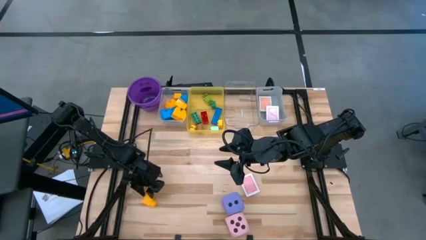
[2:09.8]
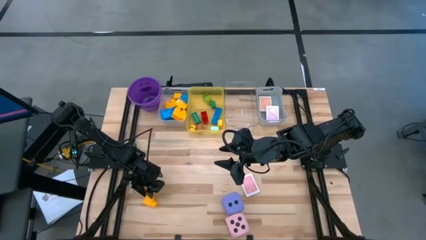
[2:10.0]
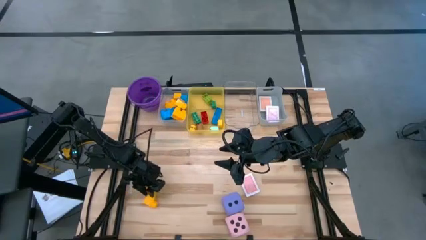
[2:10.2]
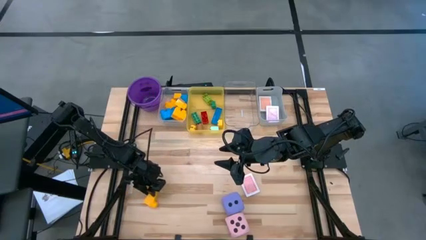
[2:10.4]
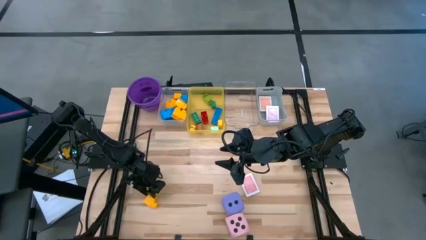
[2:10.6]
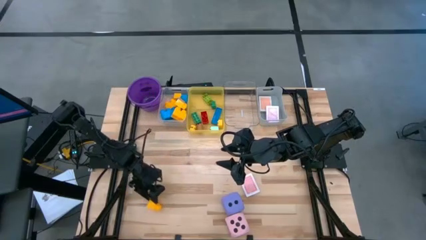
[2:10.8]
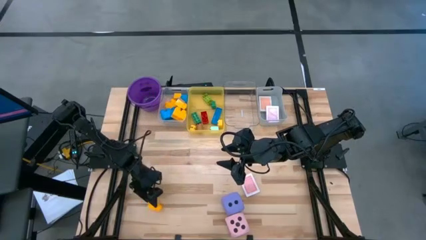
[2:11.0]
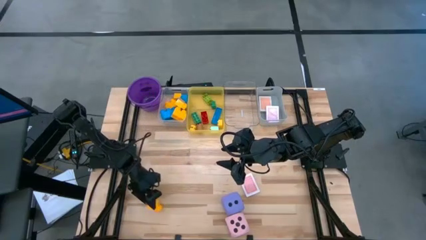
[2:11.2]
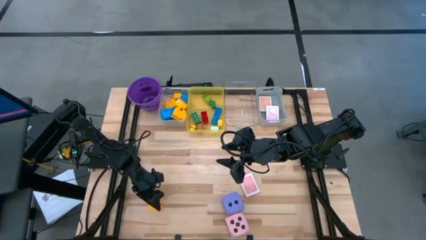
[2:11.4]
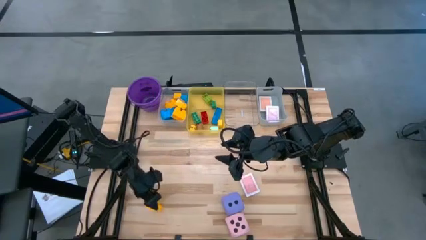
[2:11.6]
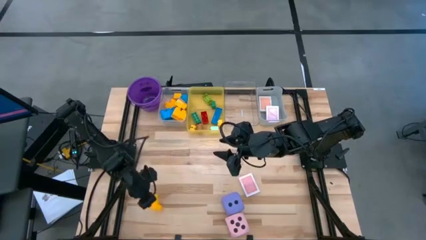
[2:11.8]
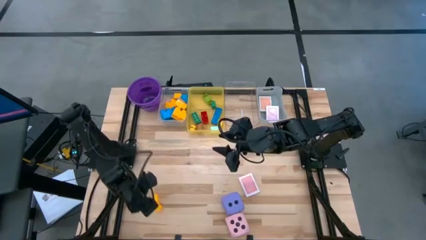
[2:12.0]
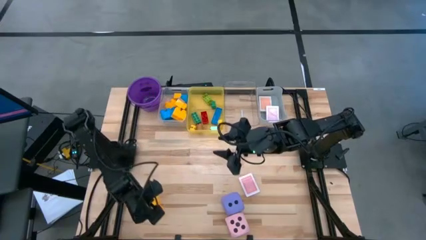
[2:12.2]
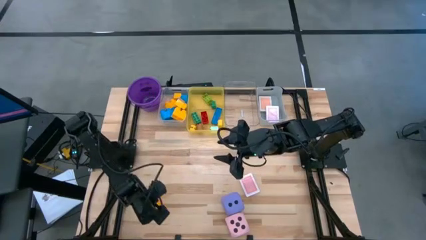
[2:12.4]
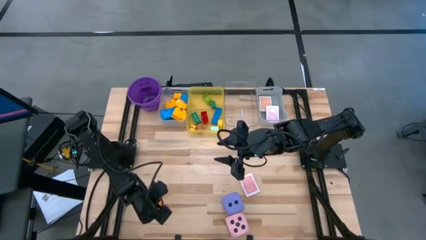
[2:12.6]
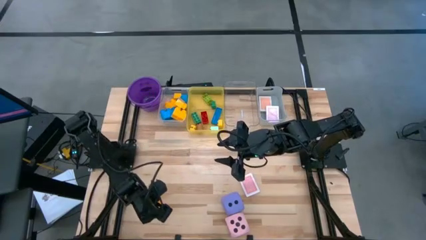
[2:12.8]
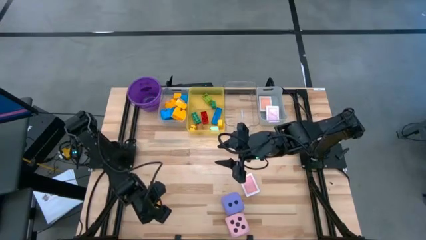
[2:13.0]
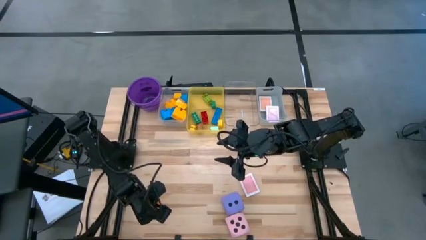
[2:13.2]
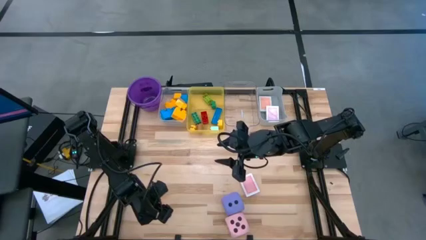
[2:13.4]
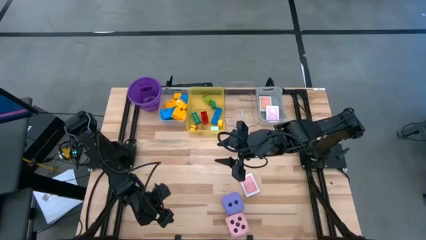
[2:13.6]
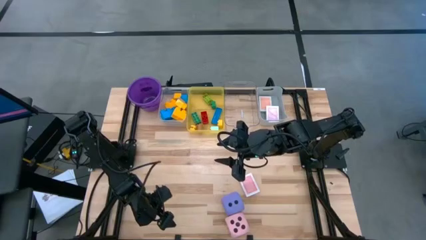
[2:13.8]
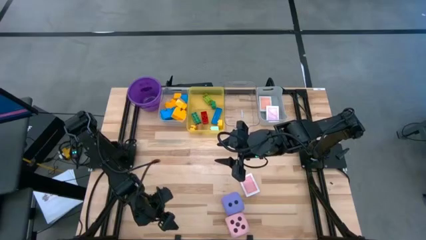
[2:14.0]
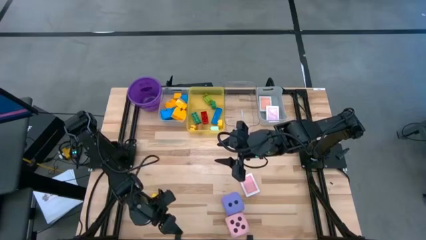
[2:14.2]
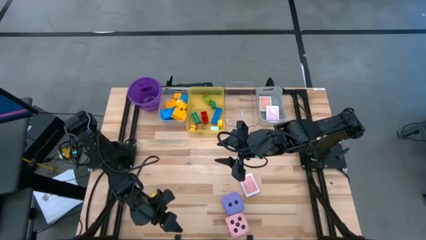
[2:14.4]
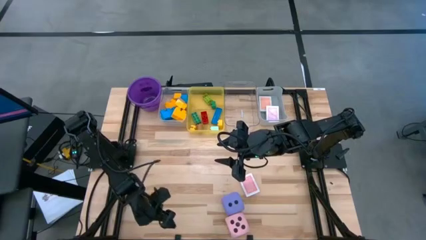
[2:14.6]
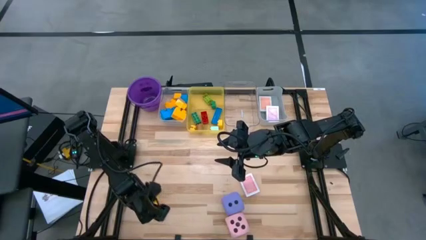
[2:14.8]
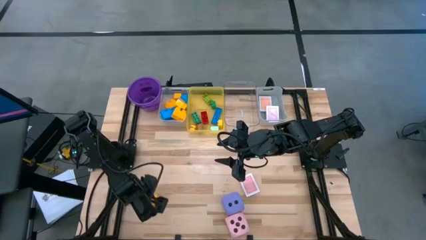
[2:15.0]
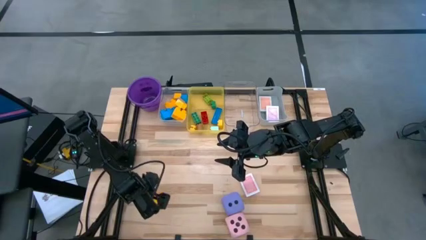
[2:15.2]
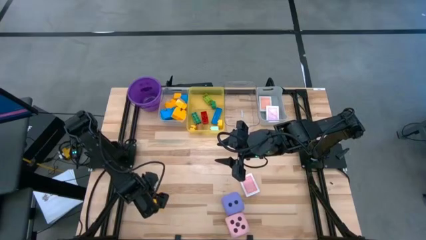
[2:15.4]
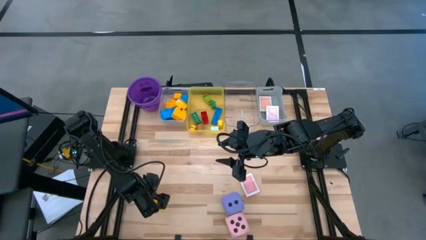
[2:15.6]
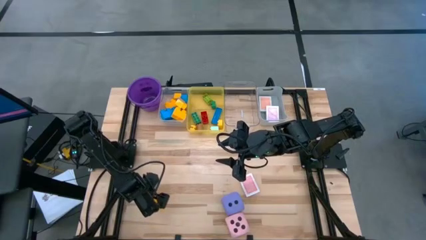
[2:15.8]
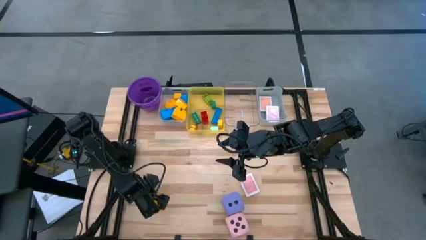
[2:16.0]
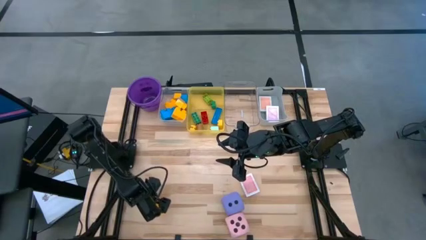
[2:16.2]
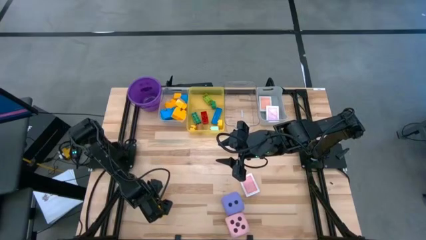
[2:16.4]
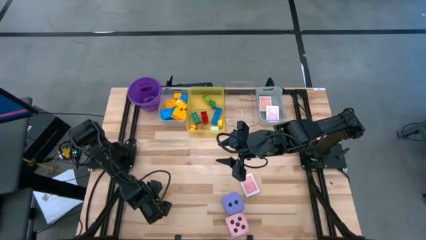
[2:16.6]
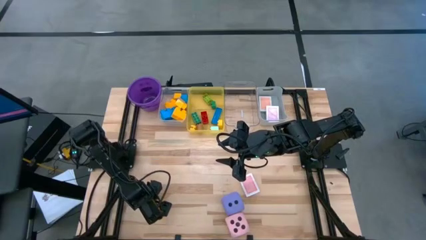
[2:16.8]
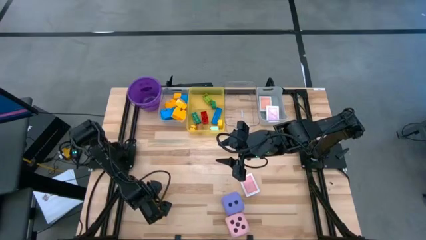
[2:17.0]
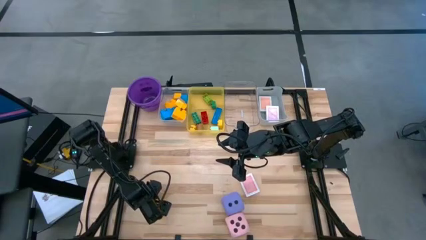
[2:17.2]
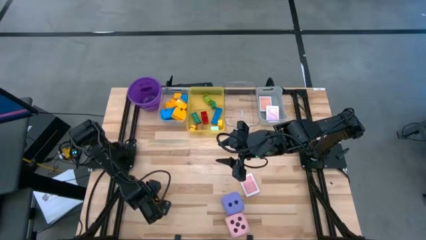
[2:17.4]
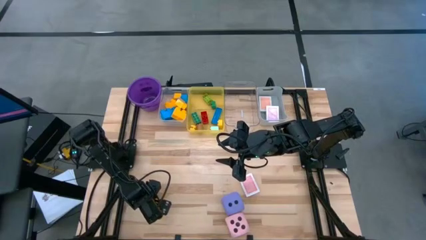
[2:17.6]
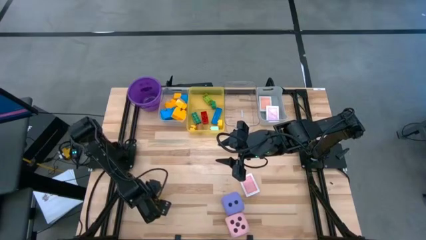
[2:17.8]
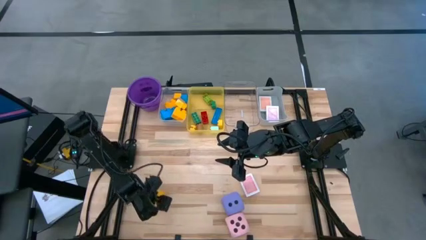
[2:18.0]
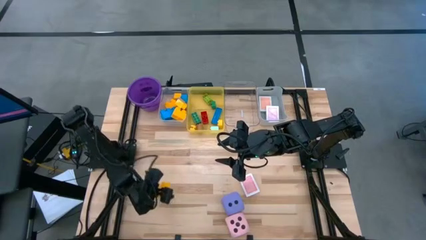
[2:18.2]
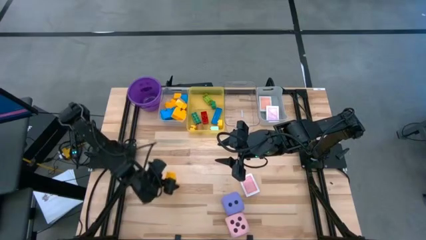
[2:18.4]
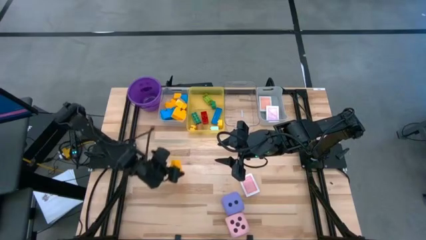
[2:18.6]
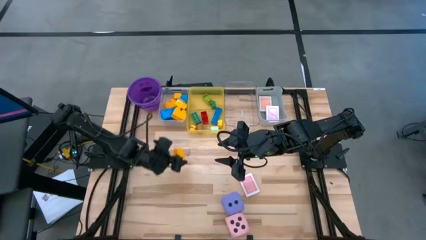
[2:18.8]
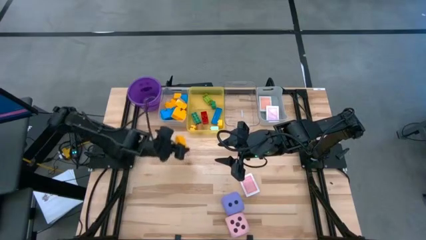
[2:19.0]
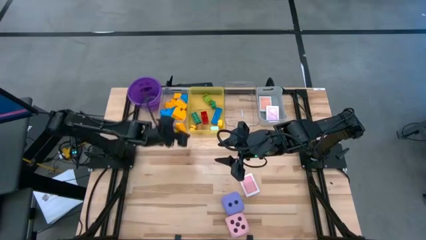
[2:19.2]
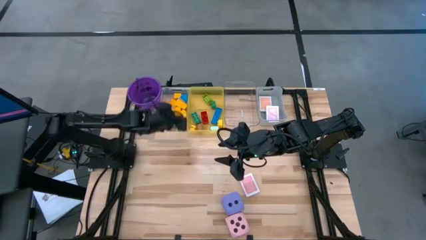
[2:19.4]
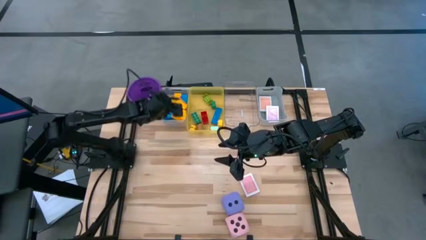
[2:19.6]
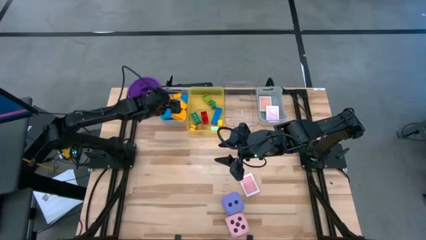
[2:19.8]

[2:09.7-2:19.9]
Task: Pick & Place Toys
Put the big yellow game piece into the white bin

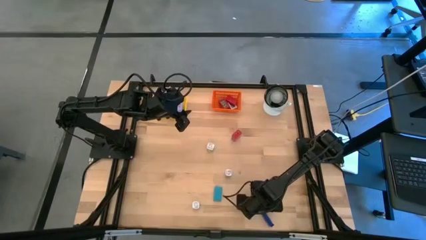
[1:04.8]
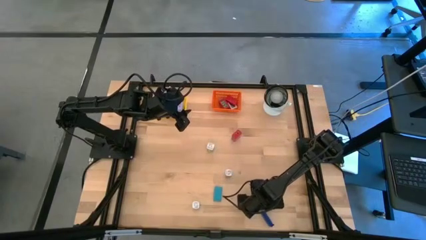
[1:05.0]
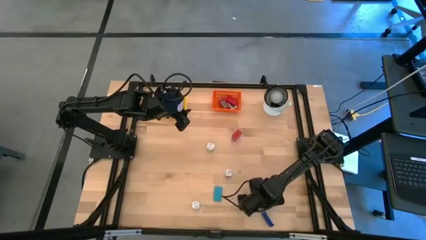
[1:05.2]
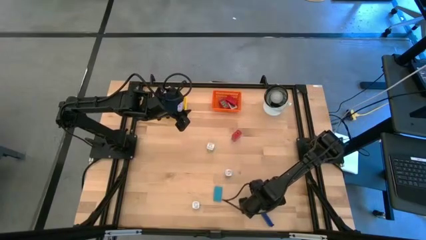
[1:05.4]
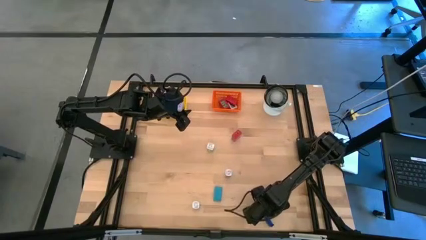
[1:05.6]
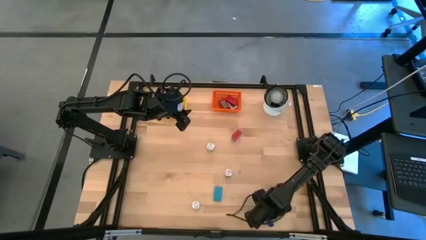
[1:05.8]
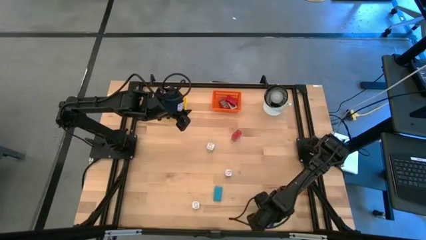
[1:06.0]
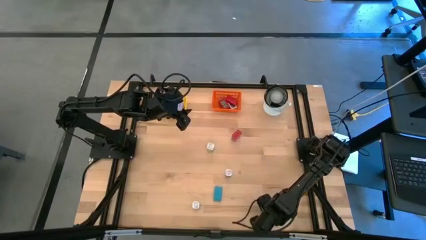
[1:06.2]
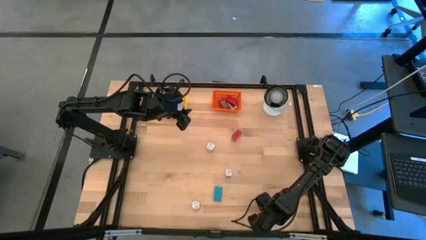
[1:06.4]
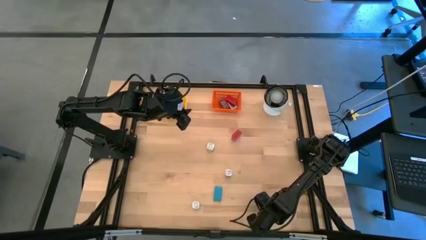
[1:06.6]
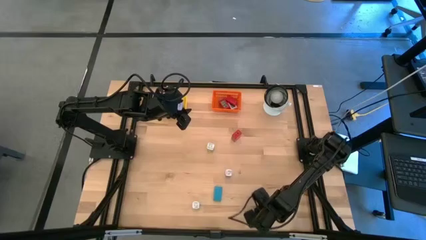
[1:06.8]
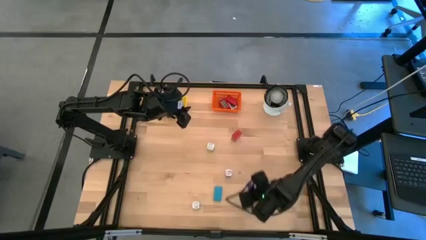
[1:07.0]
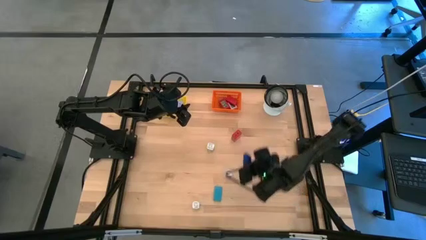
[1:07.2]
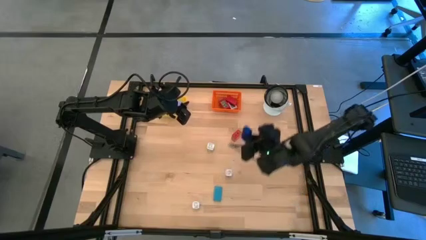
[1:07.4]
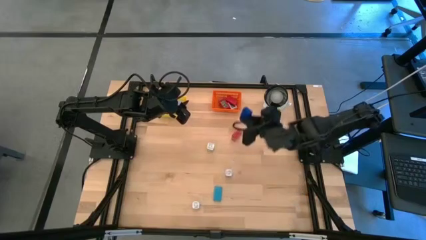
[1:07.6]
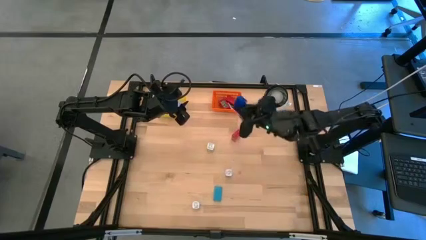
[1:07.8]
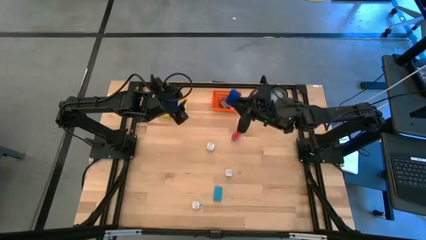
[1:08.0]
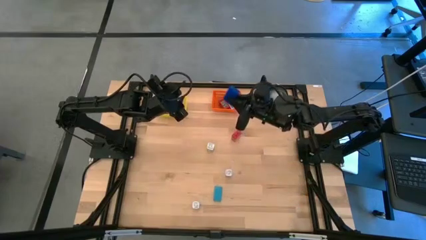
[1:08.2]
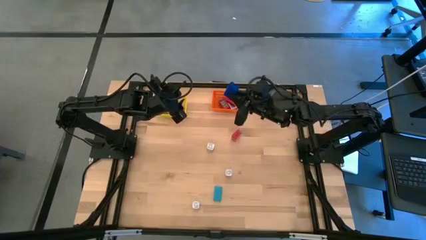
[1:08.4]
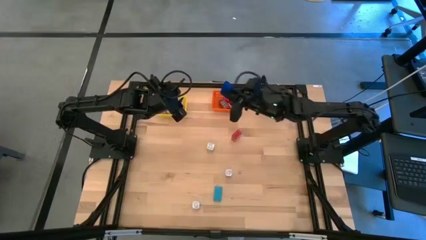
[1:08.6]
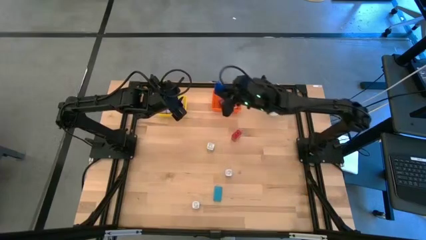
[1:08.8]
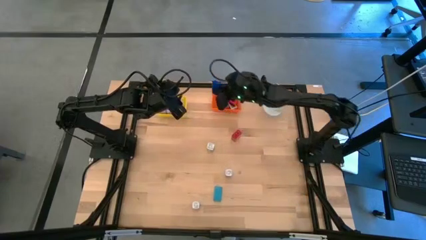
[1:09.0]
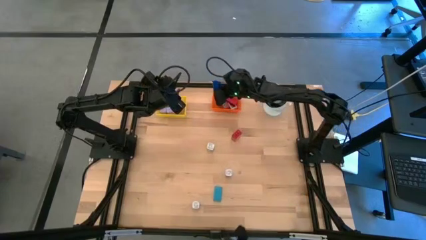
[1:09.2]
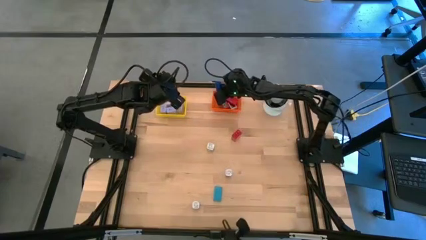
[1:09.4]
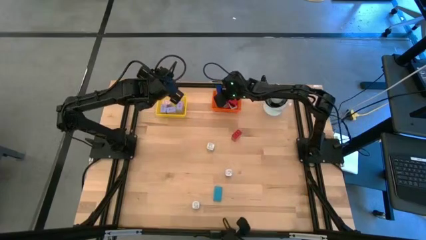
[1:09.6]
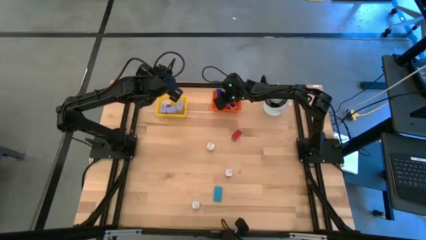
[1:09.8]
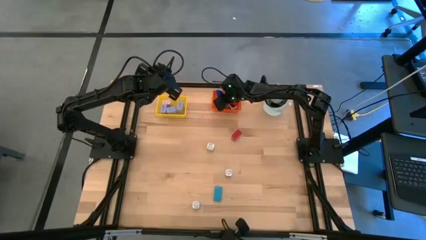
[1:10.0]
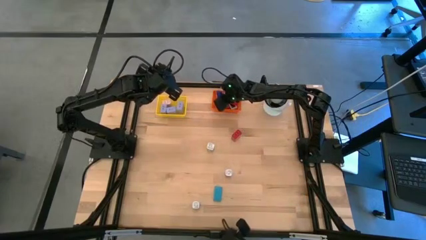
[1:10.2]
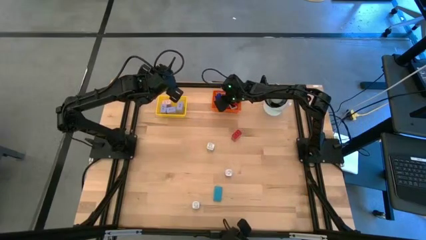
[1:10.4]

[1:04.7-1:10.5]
Task: Pick & Place Office items
Put the dark blue digital timer into the orange bin

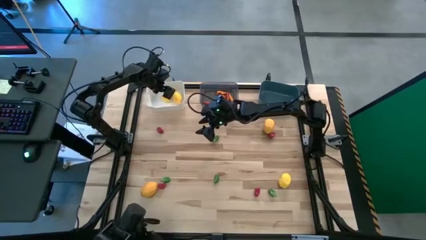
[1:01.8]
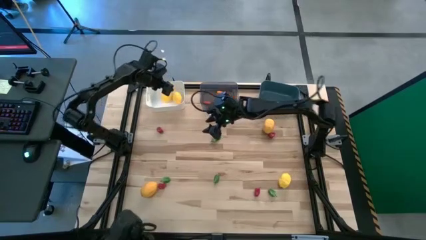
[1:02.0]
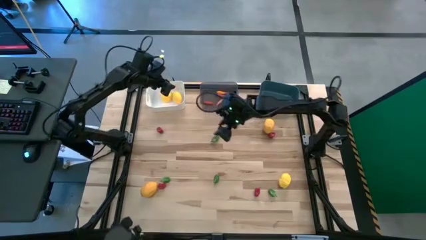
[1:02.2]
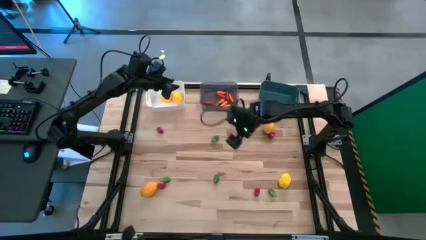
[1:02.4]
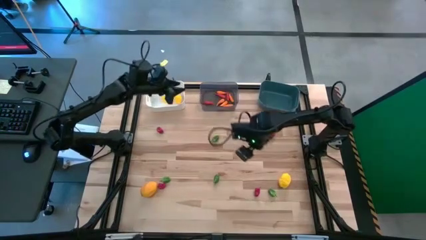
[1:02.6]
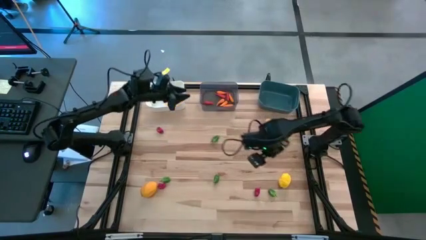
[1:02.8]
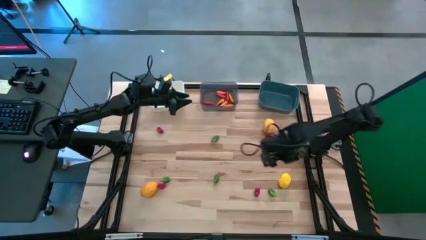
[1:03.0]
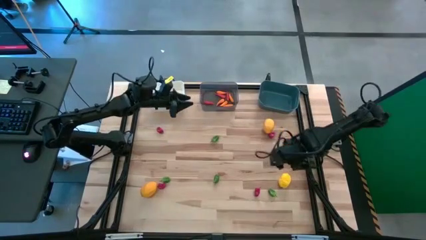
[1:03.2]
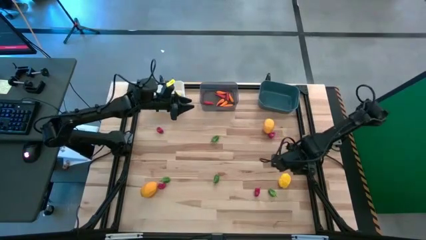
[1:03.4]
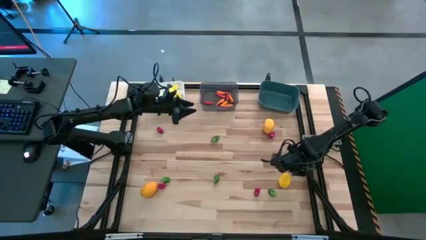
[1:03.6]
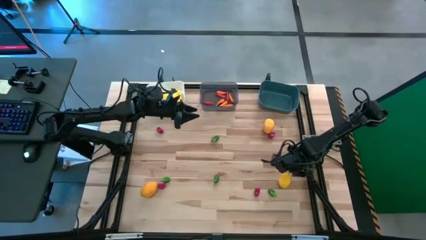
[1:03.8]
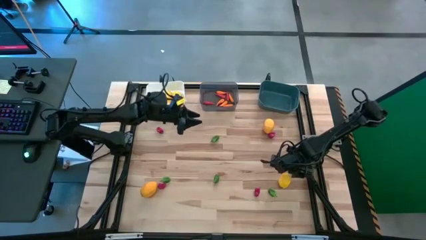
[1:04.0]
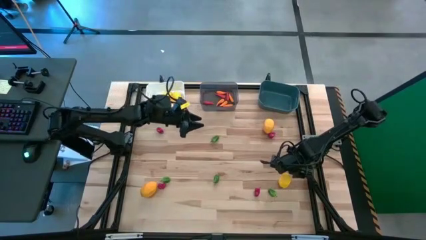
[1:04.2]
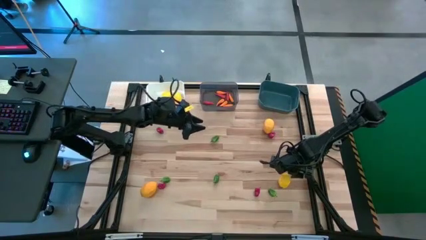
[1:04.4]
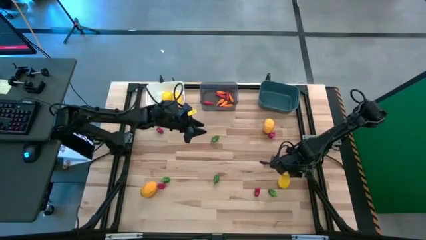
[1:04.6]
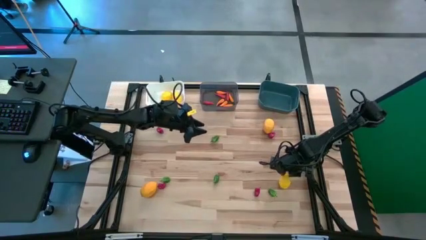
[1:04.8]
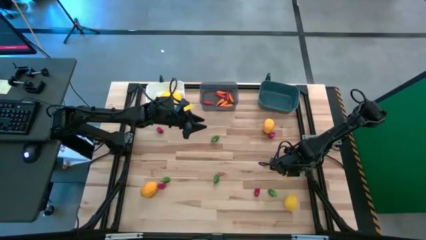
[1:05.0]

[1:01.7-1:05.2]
Task: Sort produce into baskets
Put the bottom right yellow lemon into the white bin
